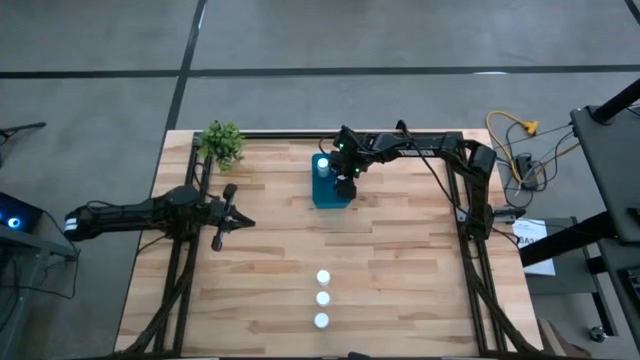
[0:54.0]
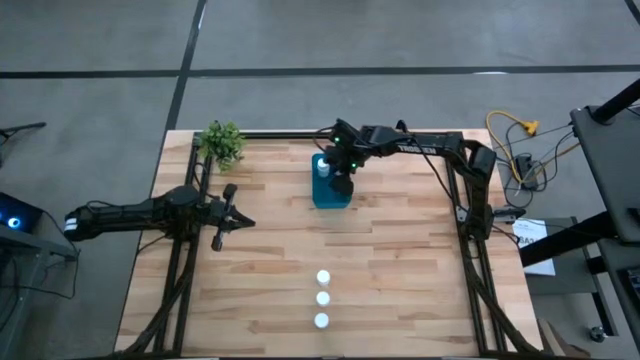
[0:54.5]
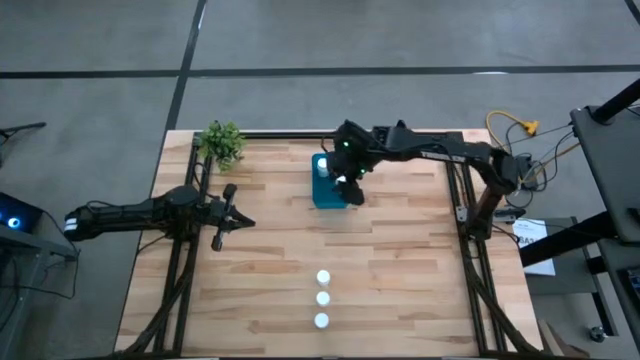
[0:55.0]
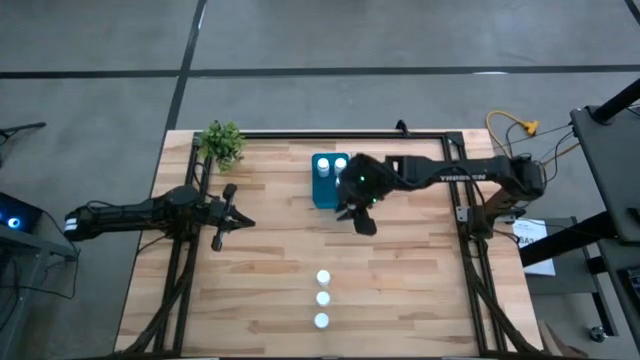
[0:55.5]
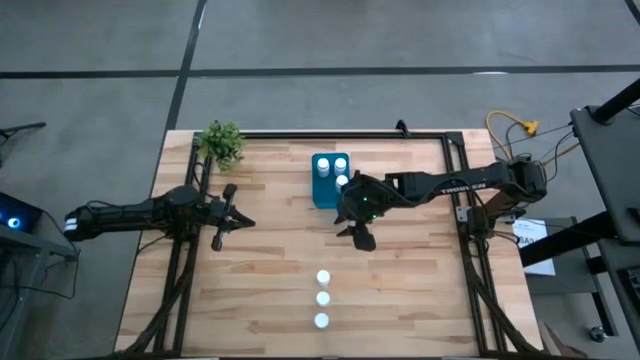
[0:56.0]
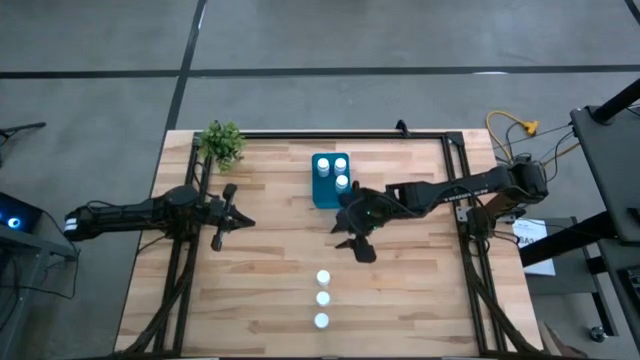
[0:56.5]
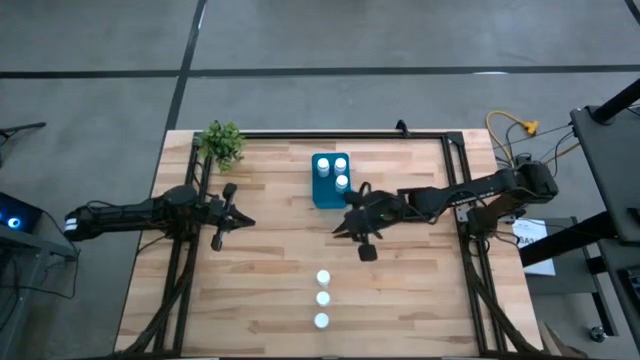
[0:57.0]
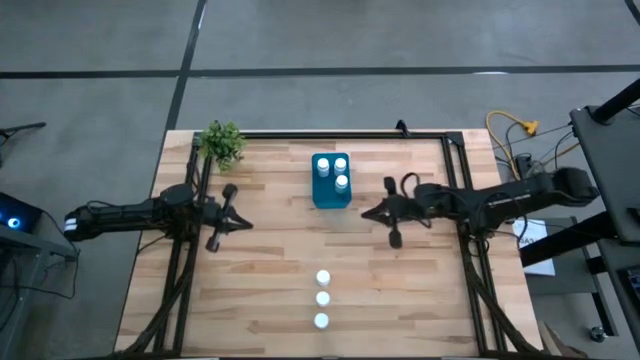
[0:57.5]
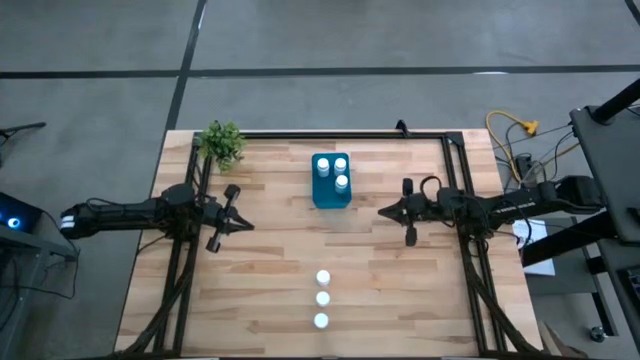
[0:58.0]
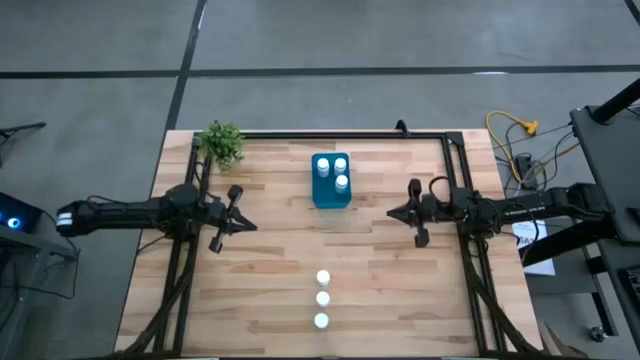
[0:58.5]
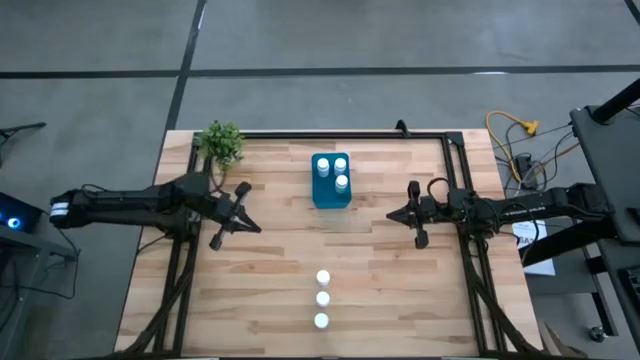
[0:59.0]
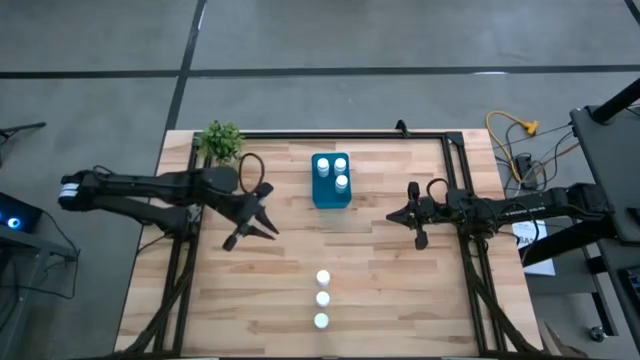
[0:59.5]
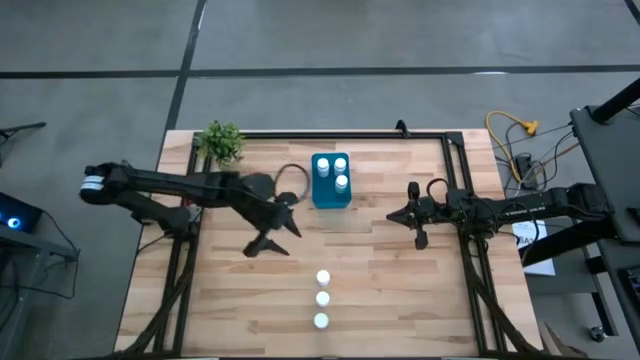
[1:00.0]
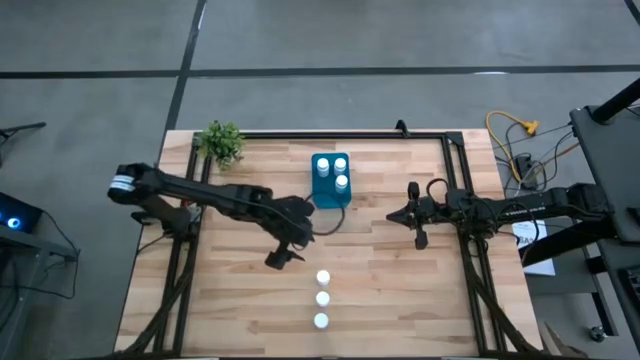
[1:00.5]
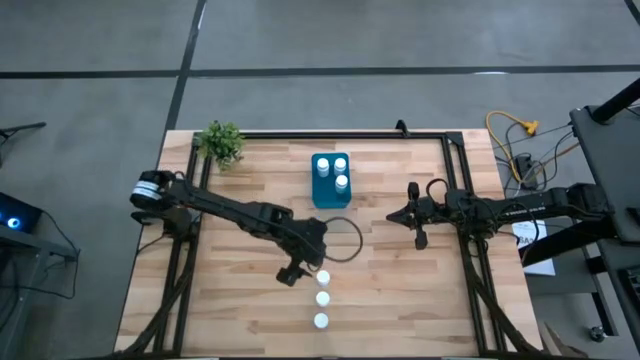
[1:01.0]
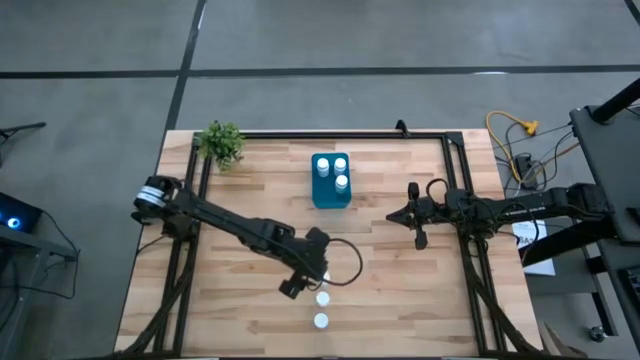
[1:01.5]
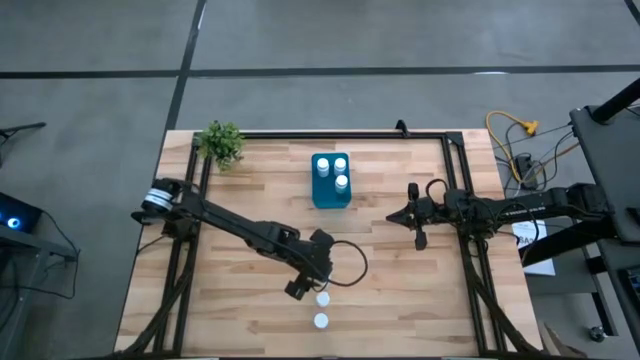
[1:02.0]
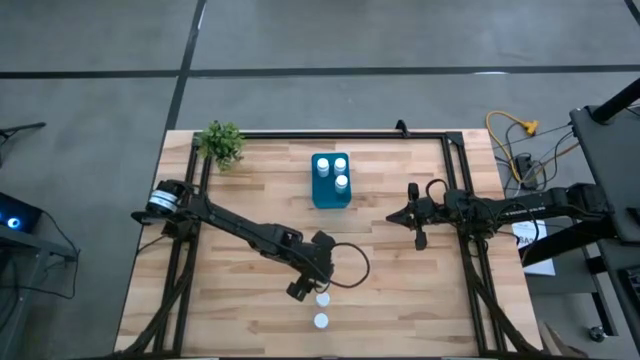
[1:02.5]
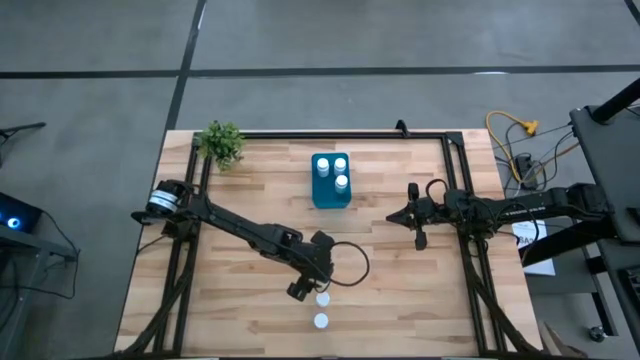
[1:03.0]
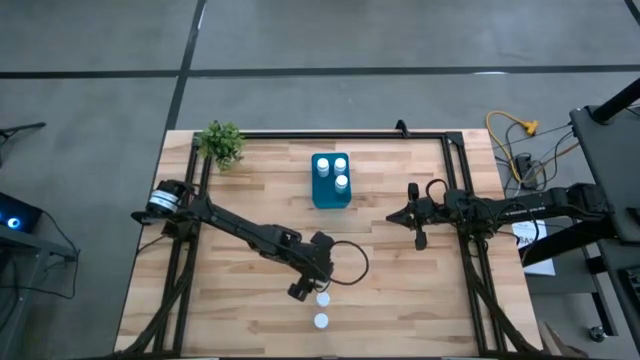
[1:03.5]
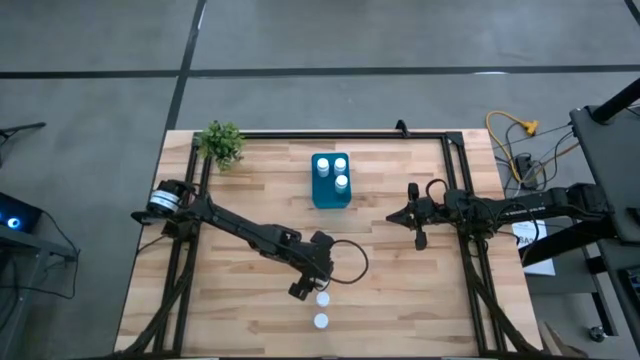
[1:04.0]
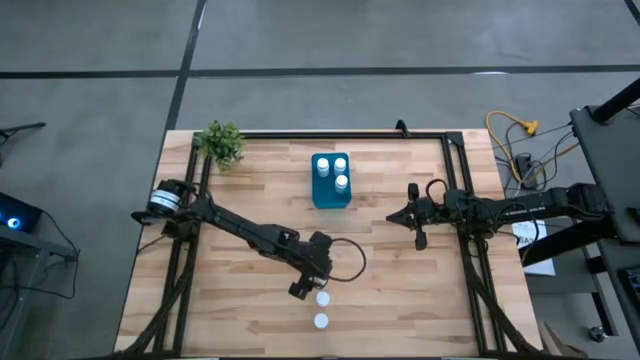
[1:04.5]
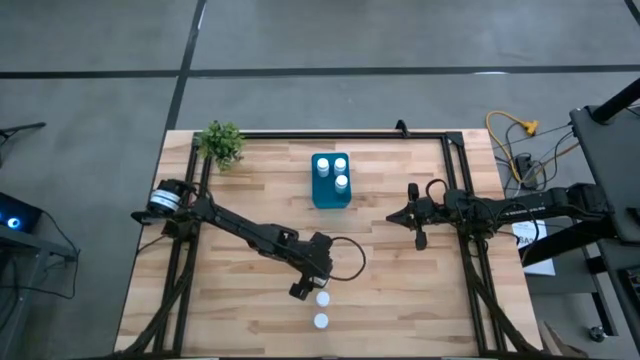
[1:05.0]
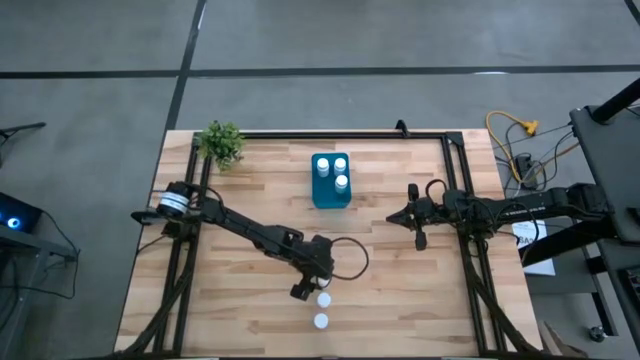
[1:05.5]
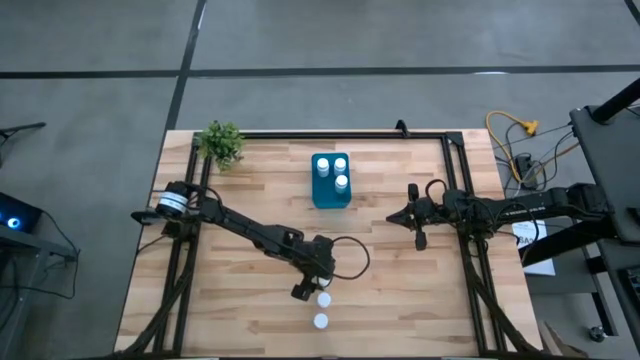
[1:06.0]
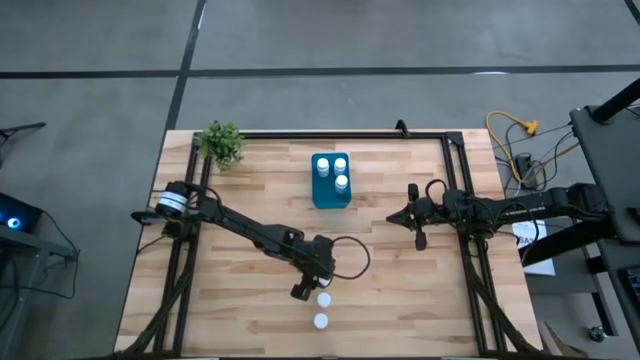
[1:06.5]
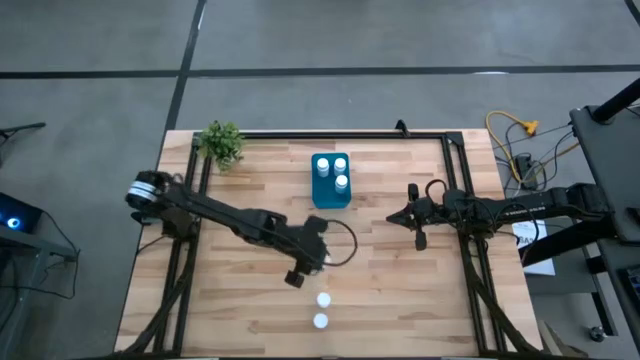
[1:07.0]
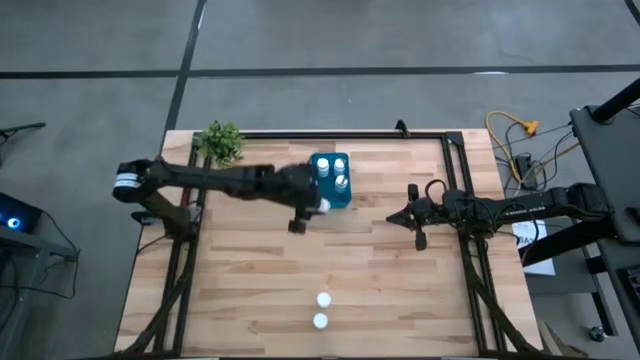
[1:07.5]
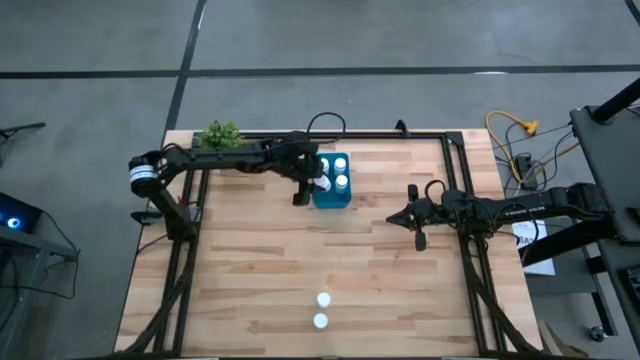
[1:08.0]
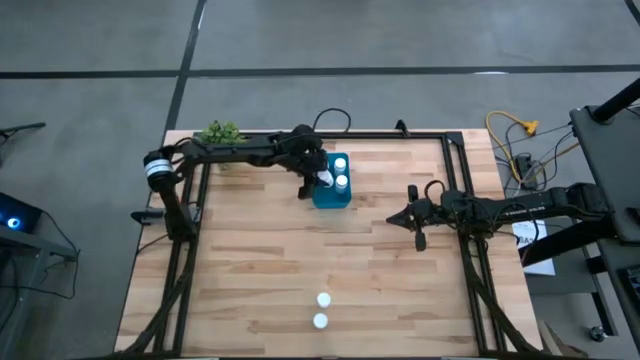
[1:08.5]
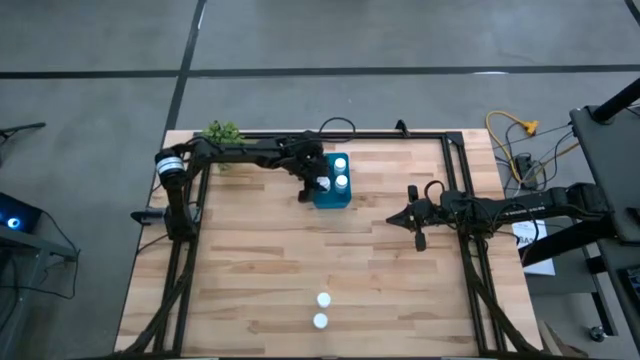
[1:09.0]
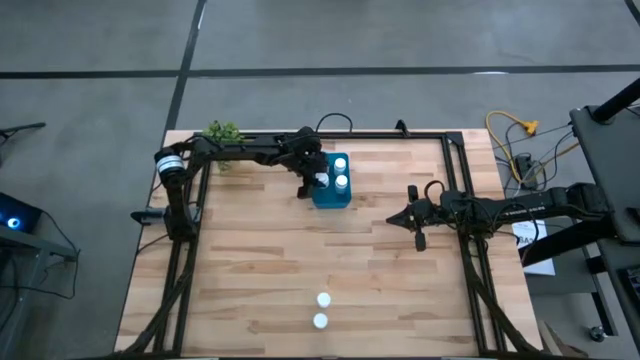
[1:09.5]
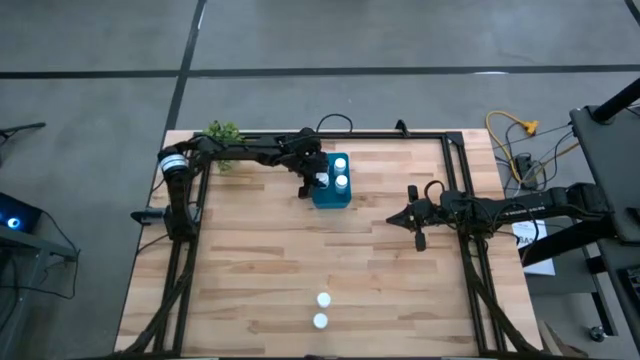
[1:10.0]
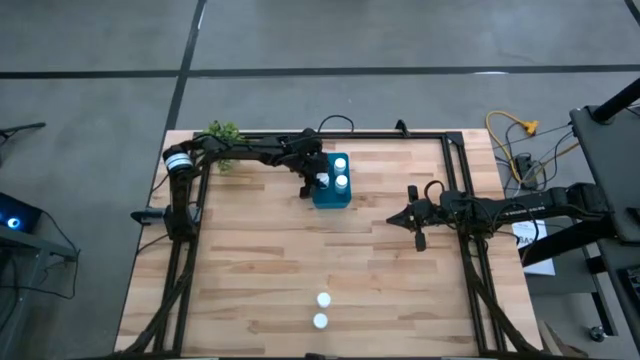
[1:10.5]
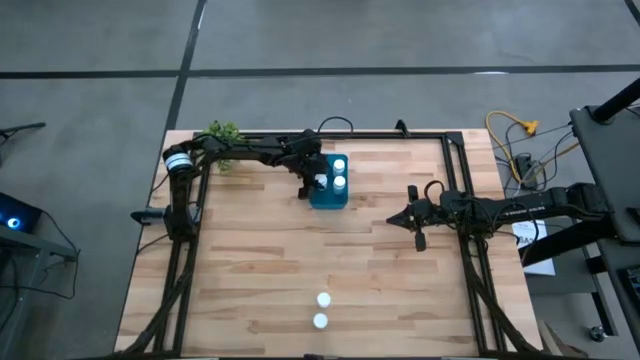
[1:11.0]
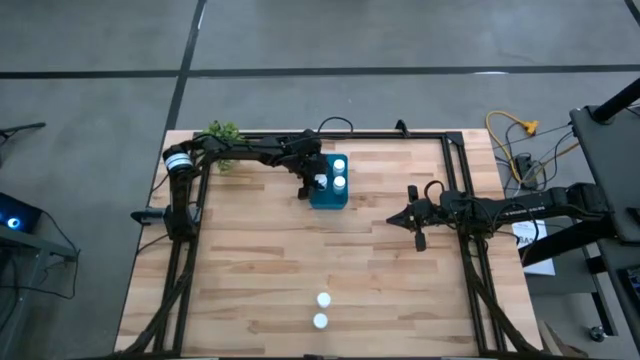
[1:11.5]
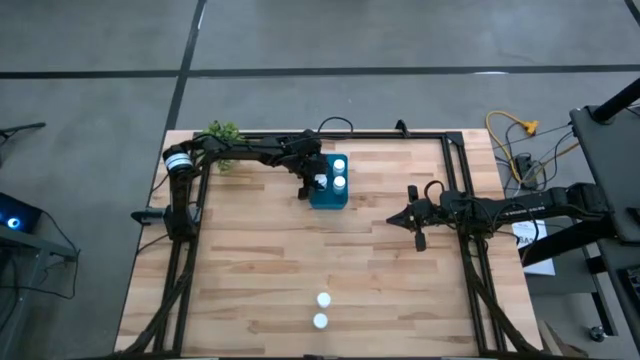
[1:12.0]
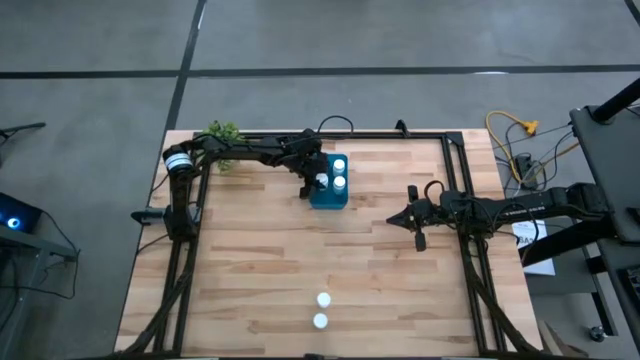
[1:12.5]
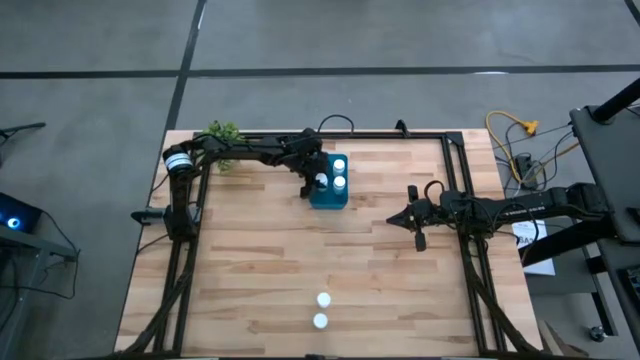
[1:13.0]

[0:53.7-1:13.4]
Task: Pick and place pill bottles into a basket
Put the top white pill bottle into the blue bin
